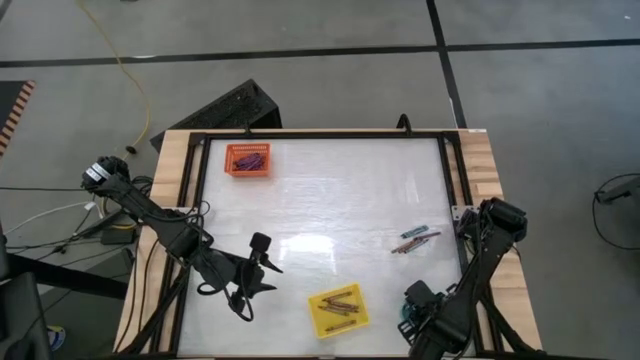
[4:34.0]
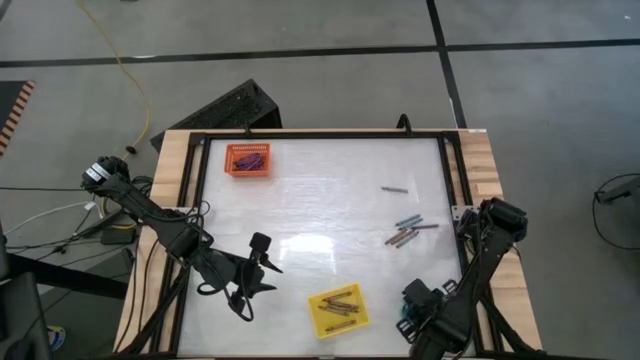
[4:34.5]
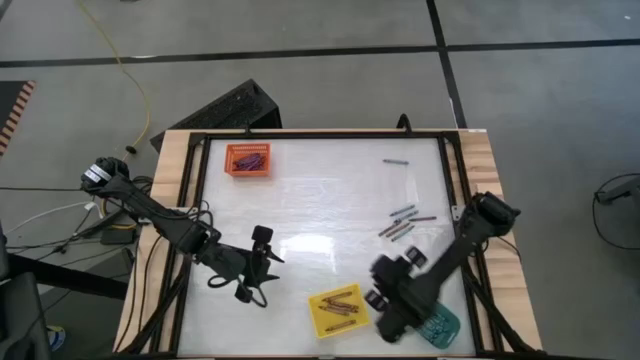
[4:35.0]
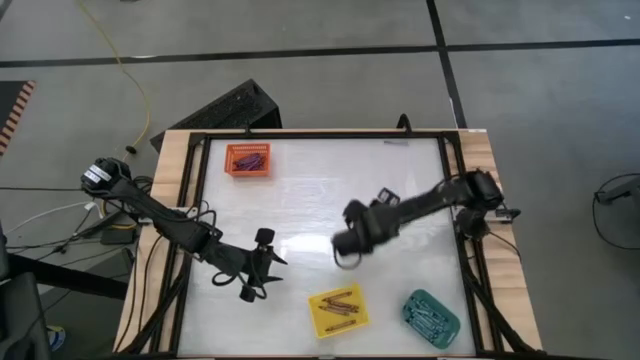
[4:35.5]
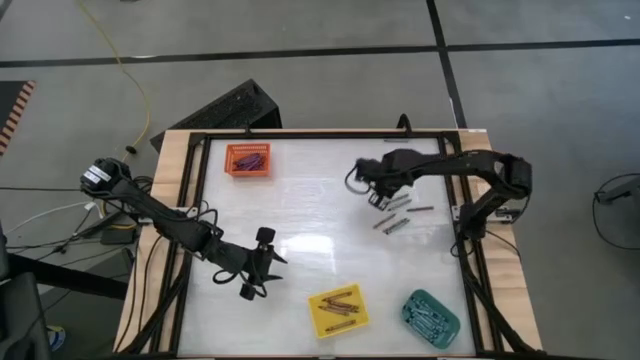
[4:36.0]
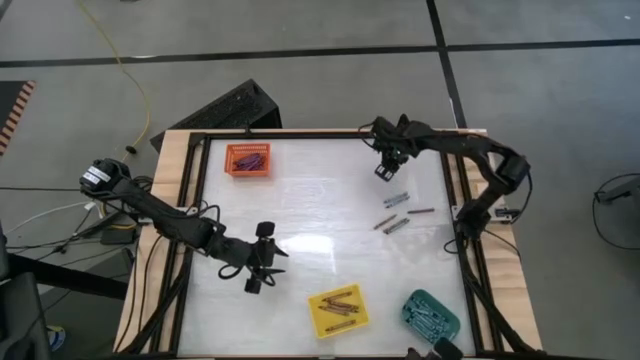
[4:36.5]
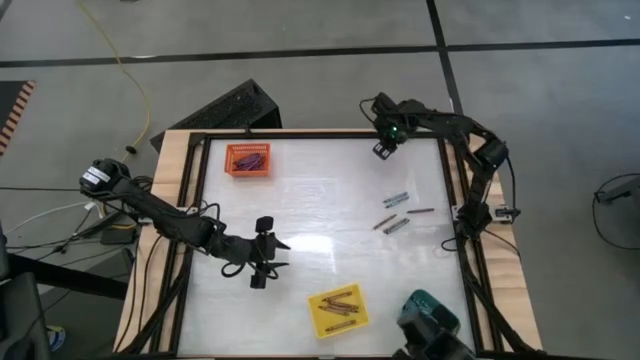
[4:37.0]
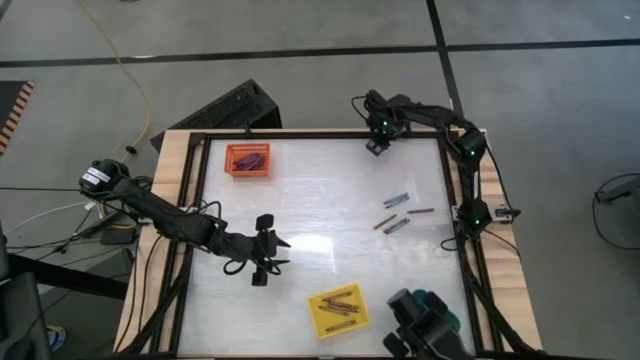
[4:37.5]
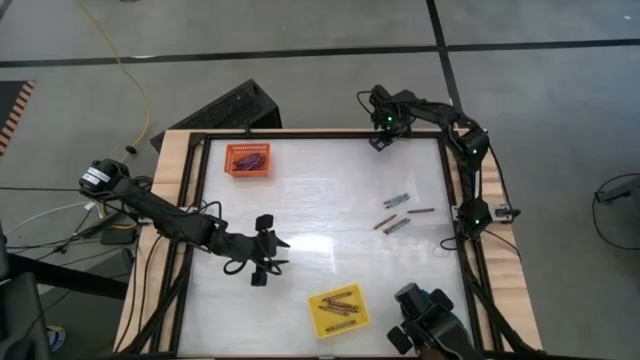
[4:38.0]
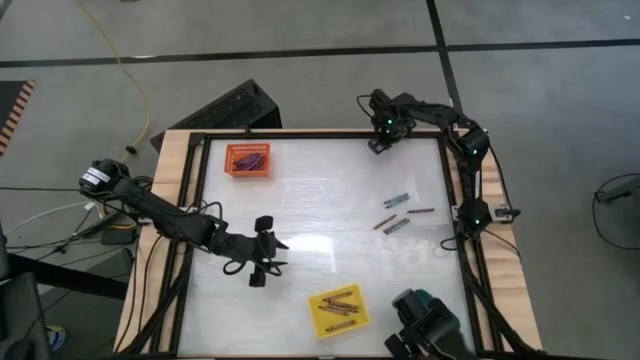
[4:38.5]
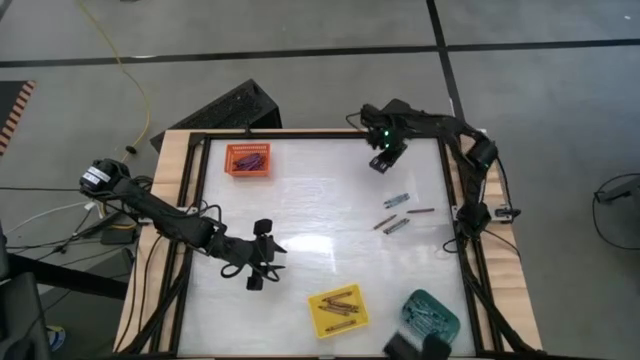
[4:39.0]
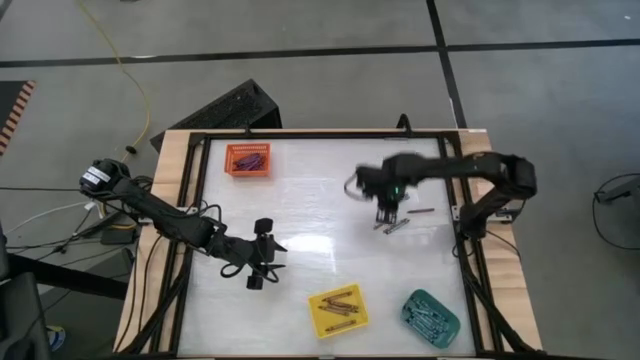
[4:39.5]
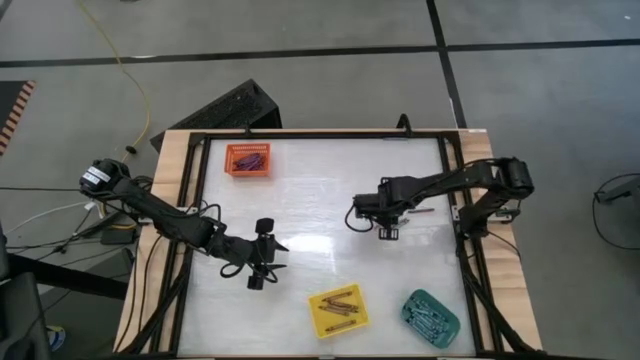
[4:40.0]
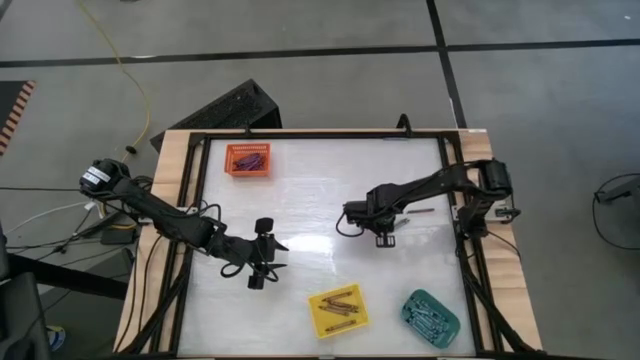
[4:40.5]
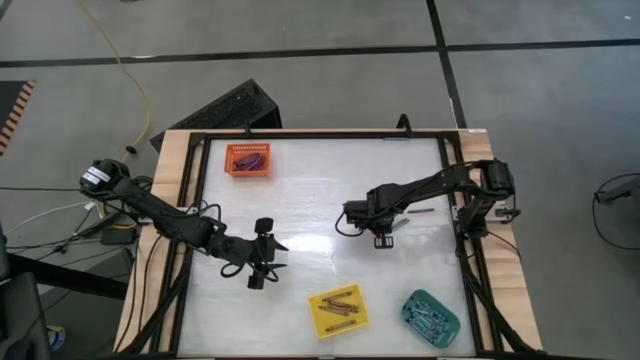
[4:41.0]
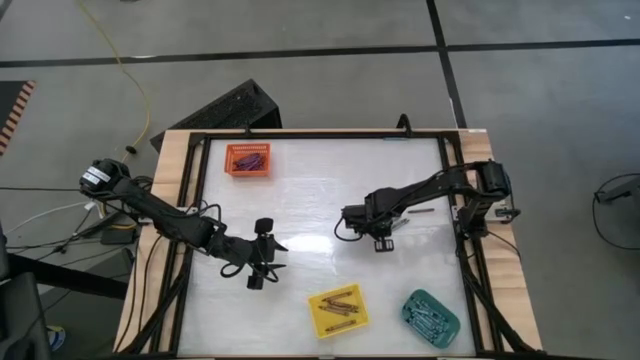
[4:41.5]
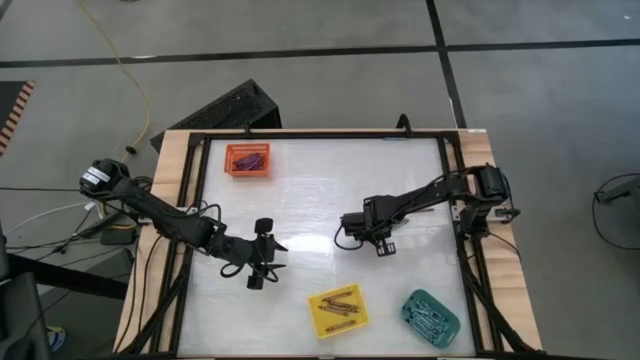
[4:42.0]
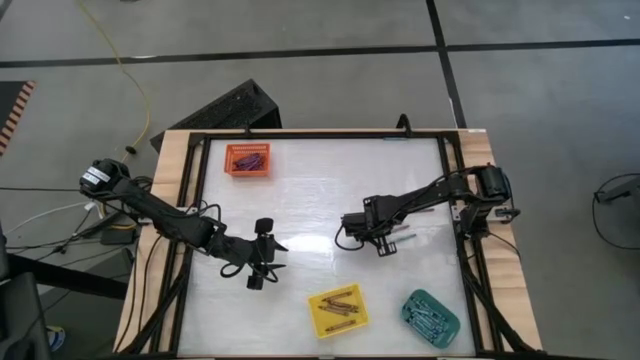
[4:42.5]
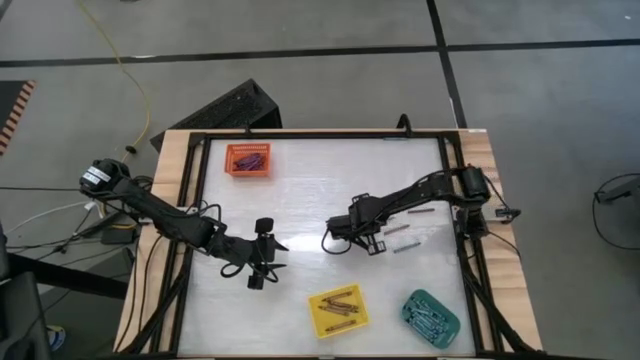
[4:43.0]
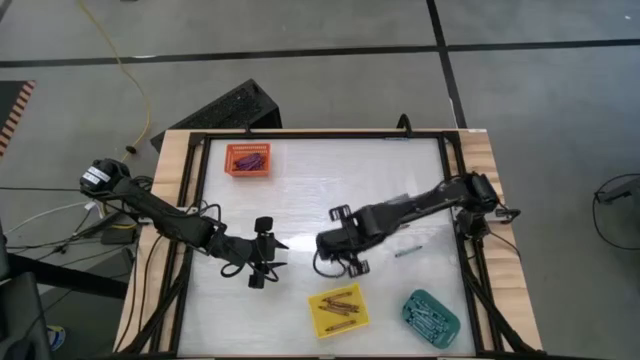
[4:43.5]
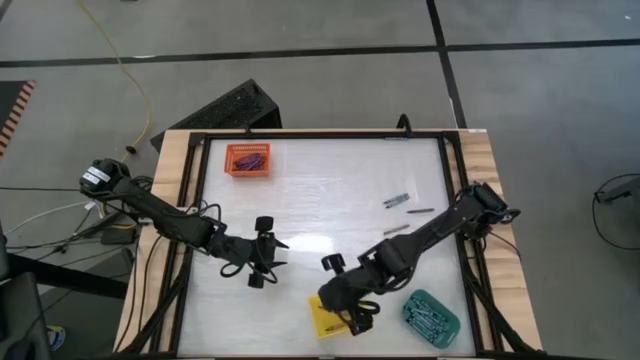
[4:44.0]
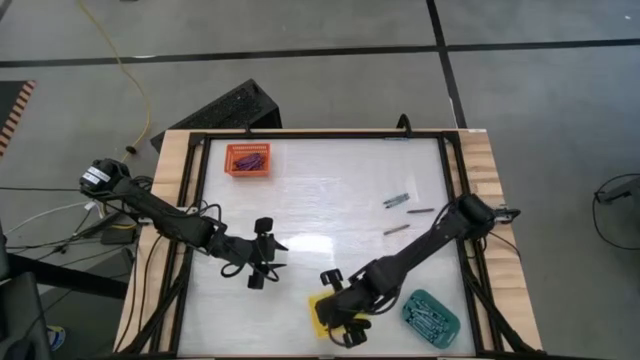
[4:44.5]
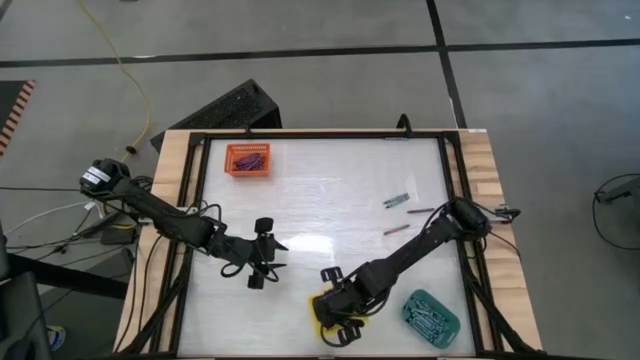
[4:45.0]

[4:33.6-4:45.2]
Task: Sort crayons
Put the brown crayon into the yellow bin

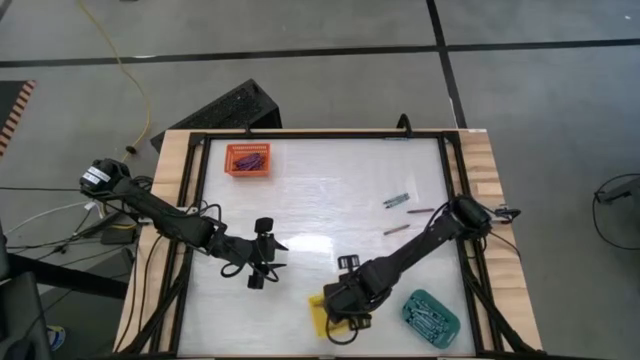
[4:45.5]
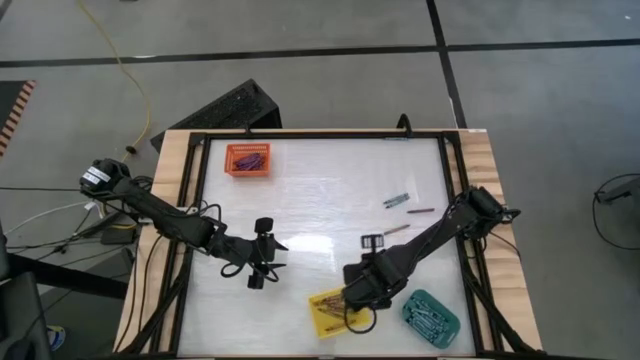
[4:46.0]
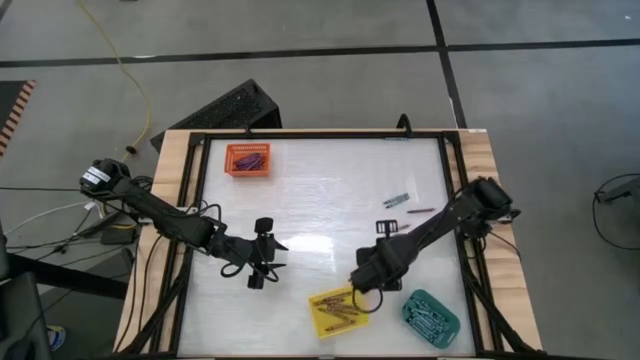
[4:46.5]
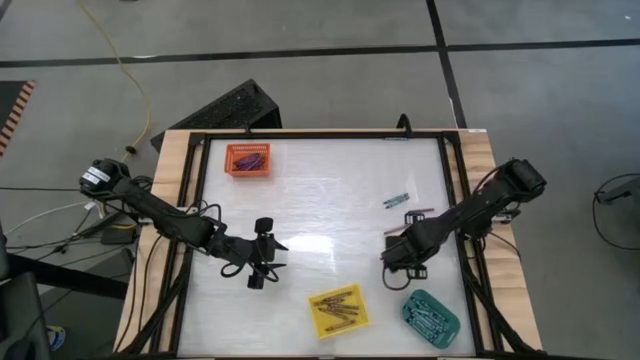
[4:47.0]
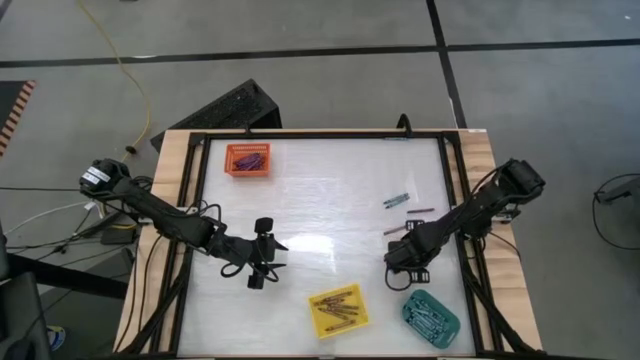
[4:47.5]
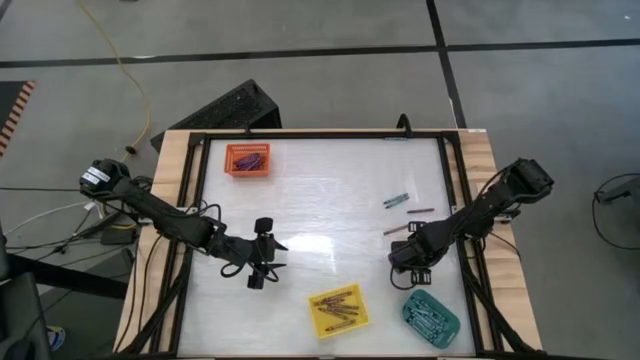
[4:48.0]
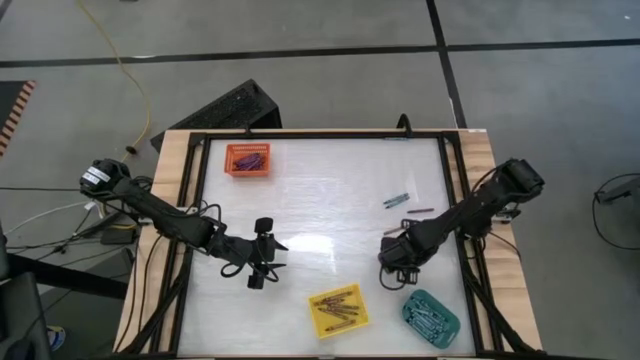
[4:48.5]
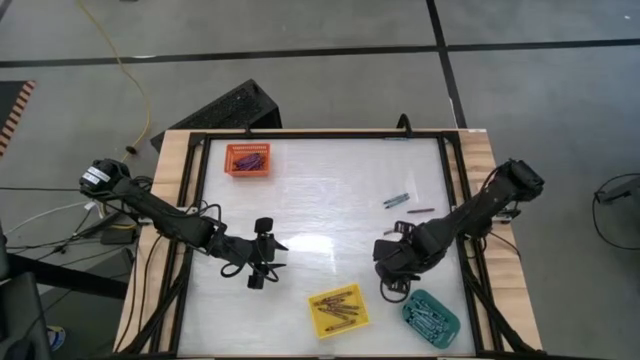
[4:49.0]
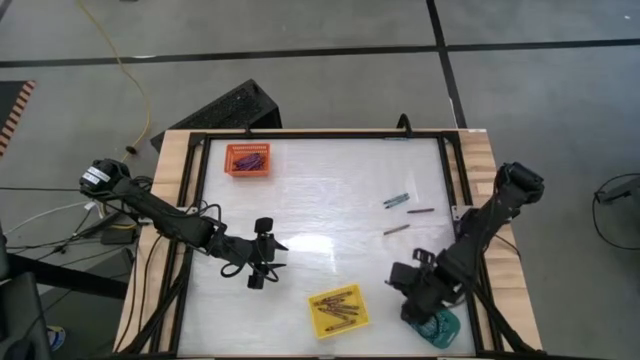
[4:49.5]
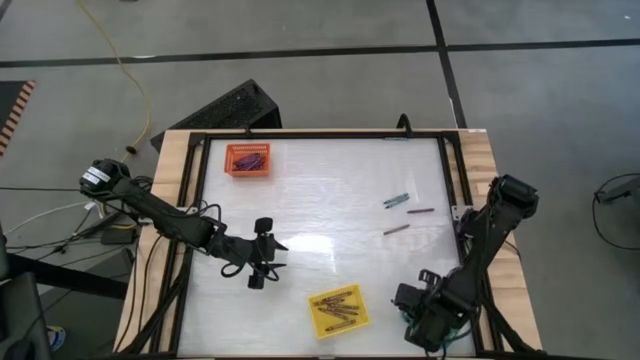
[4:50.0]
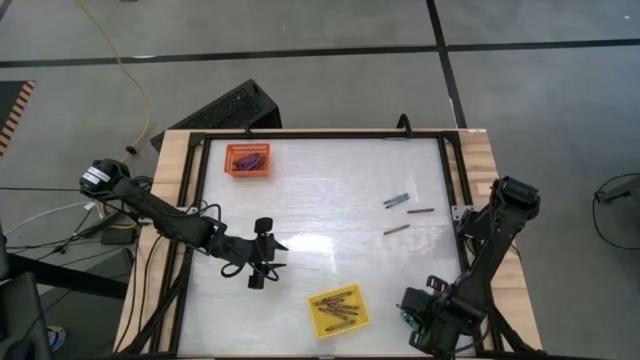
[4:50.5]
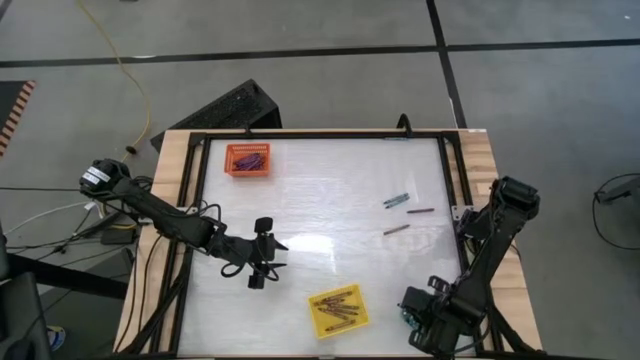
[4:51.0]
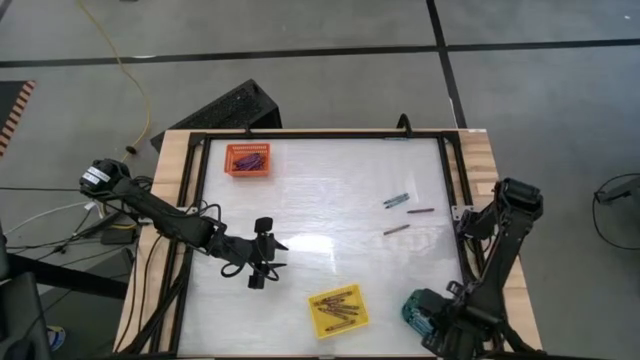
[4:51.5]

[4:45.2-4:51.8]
Put the blue crayon into the green bin

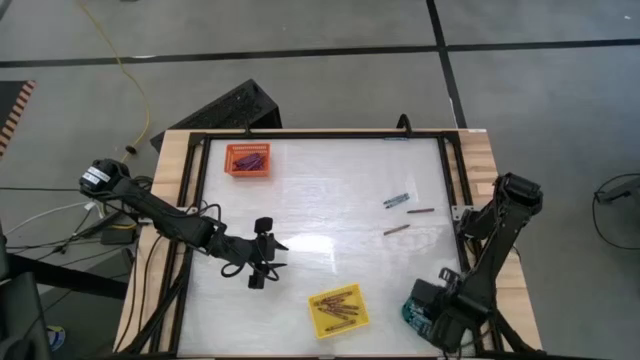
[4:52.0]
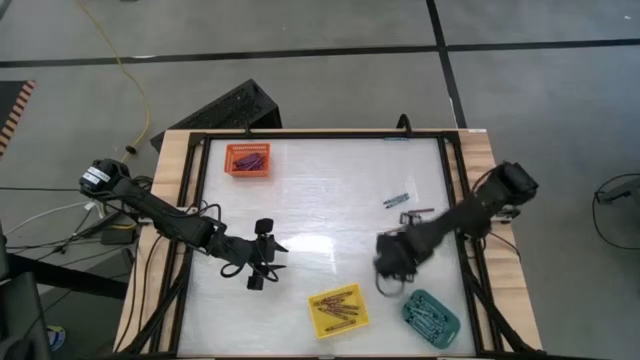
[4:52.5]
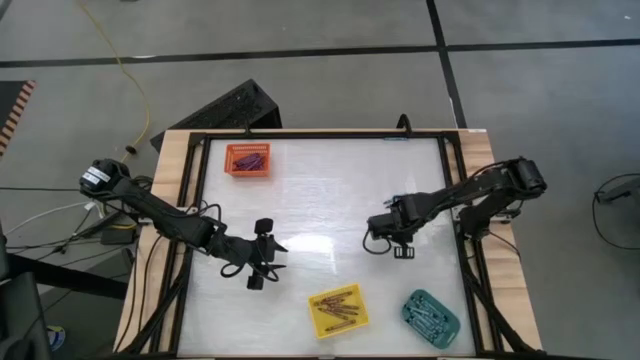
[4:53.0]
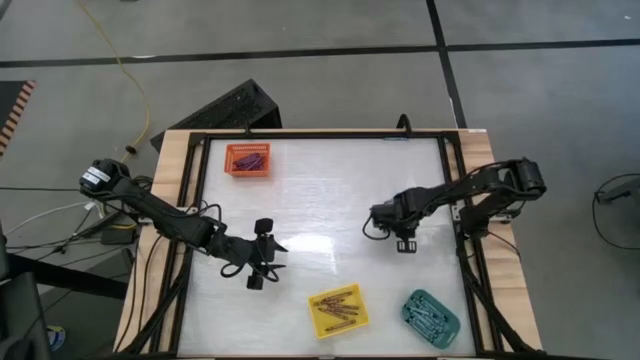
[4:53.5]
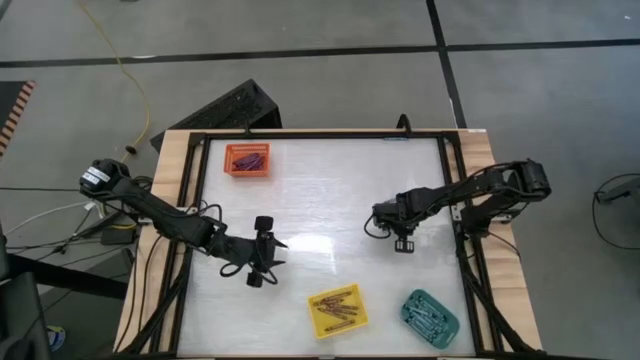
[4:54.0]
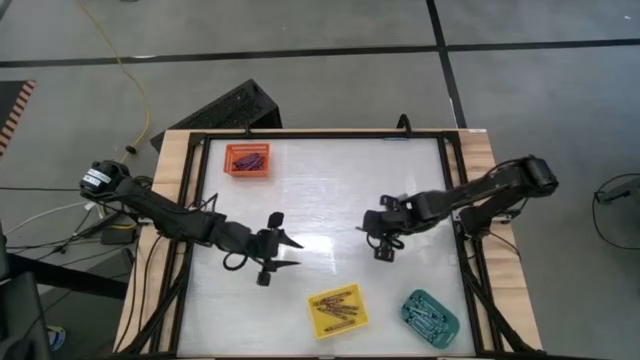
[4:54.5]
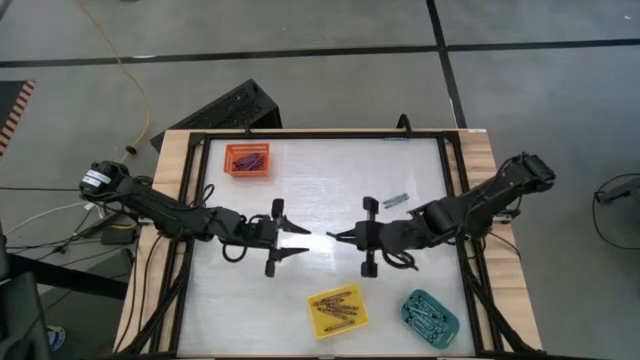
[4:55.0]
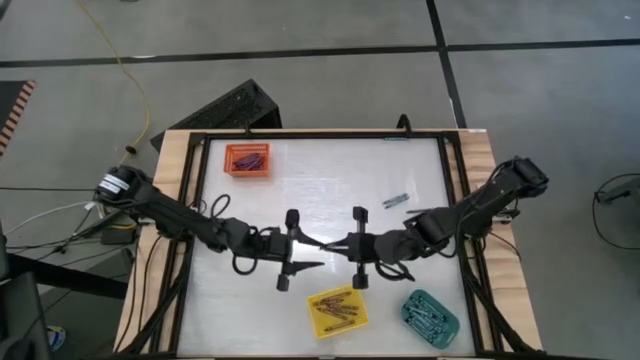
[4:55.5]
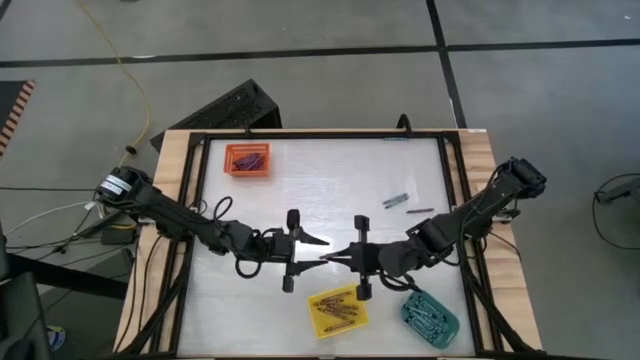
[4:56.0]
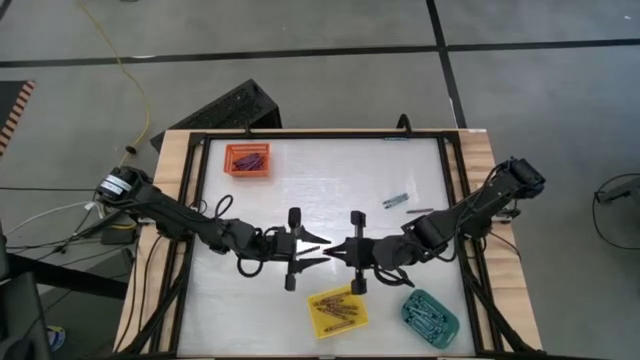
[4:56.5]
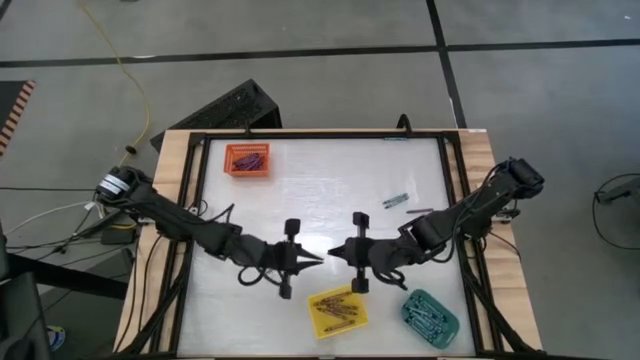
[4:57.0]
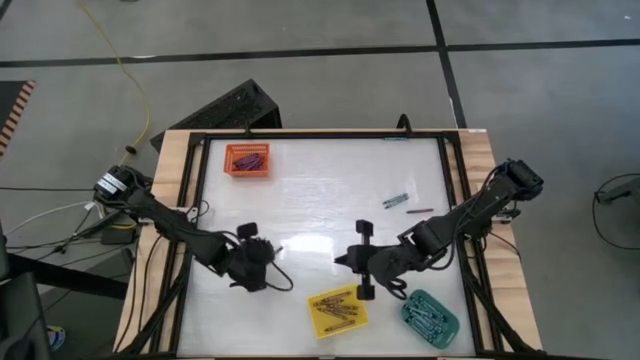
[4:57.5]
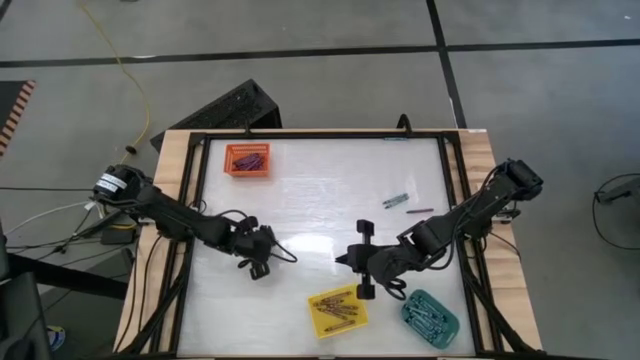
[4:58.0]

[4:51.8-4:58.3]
Put the brown crayon into the yellow bin
